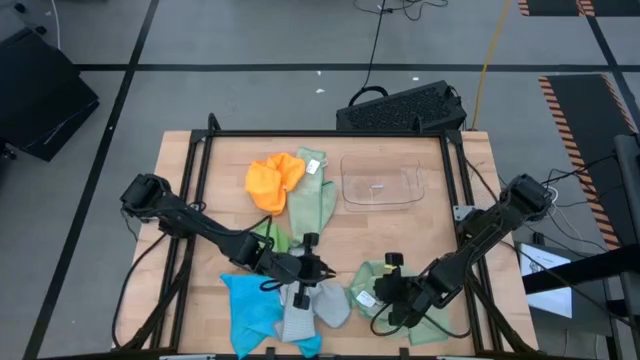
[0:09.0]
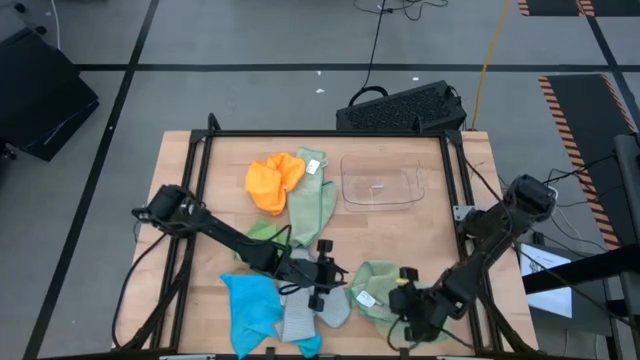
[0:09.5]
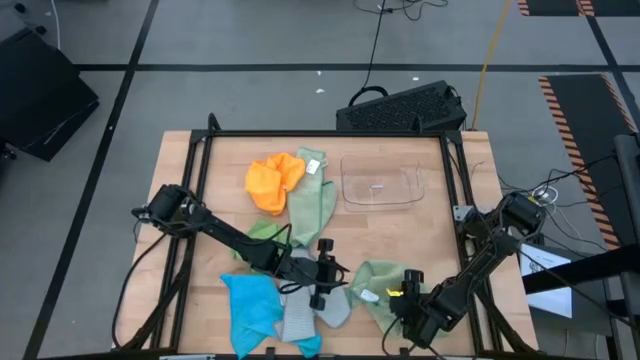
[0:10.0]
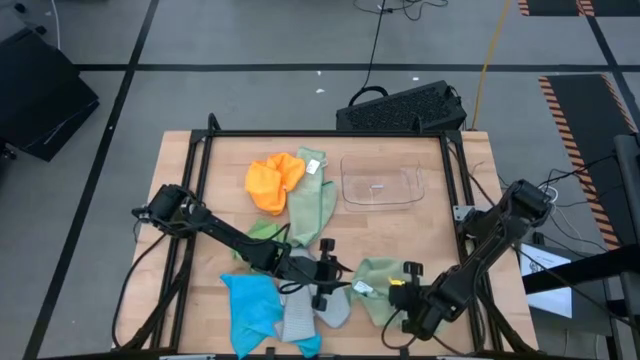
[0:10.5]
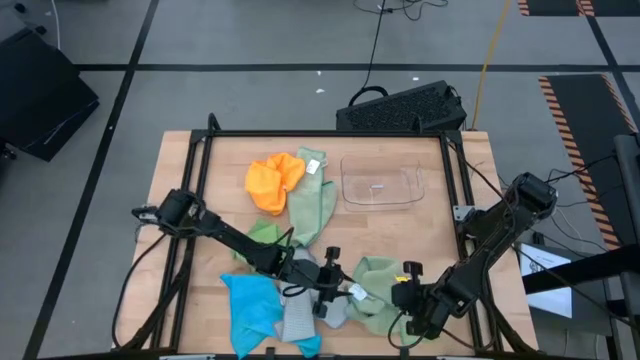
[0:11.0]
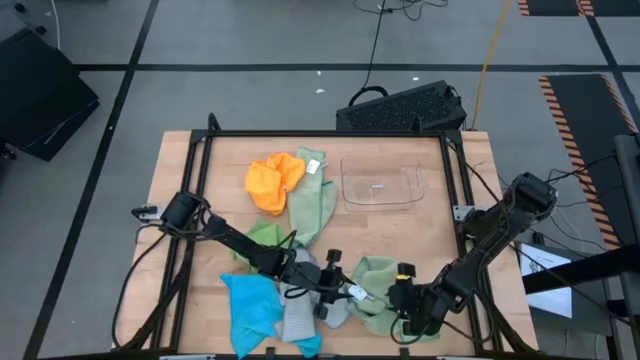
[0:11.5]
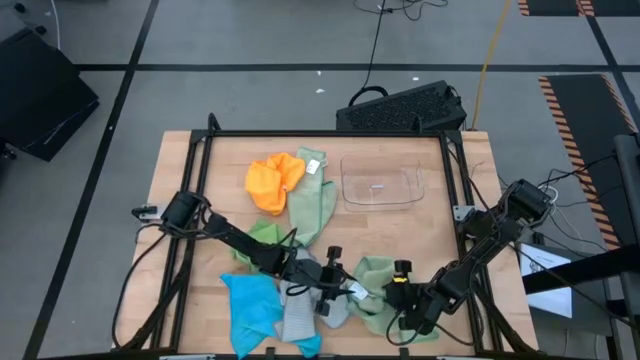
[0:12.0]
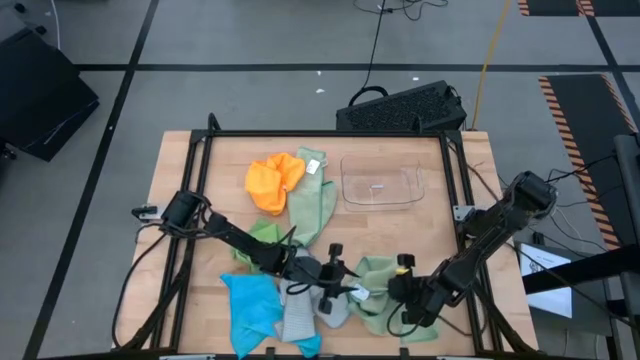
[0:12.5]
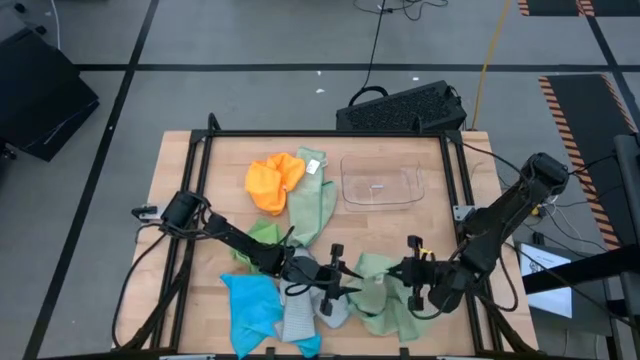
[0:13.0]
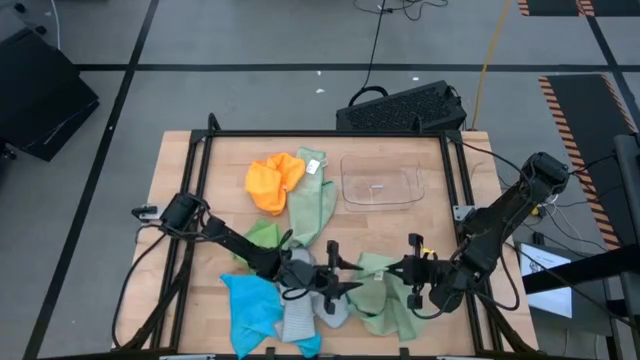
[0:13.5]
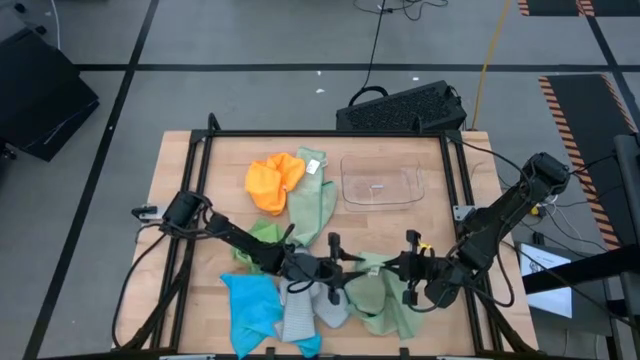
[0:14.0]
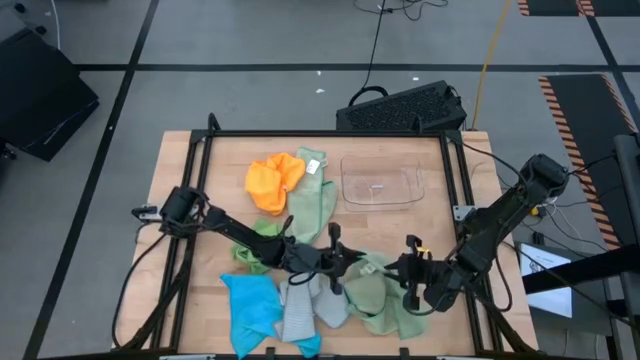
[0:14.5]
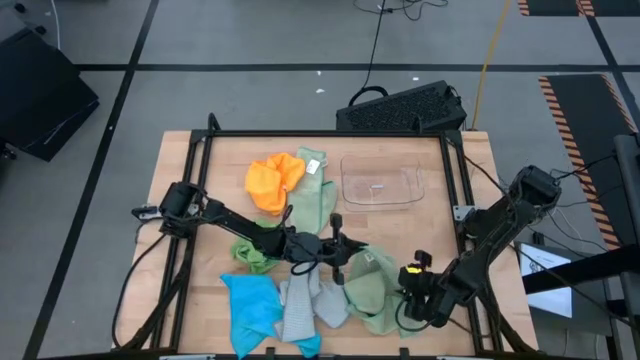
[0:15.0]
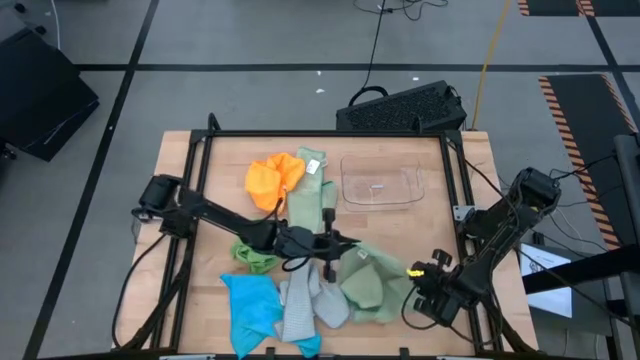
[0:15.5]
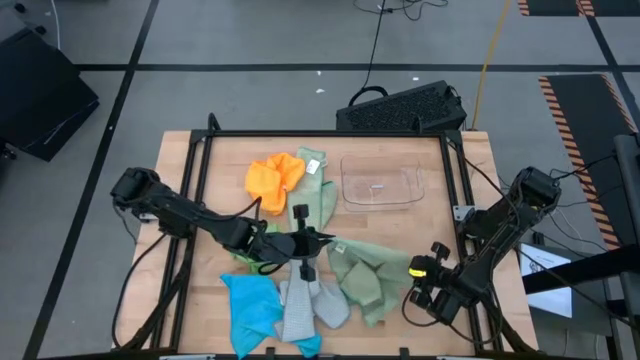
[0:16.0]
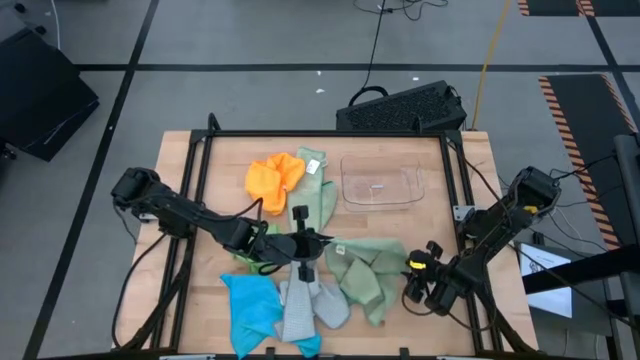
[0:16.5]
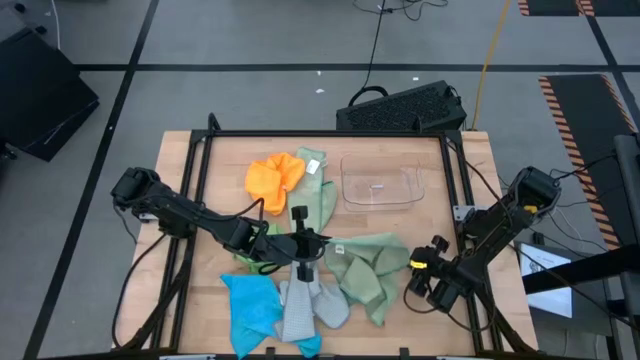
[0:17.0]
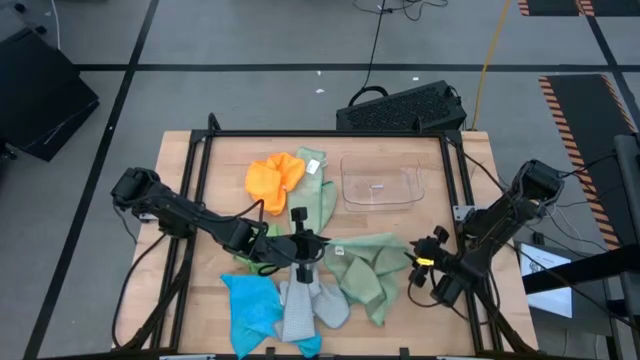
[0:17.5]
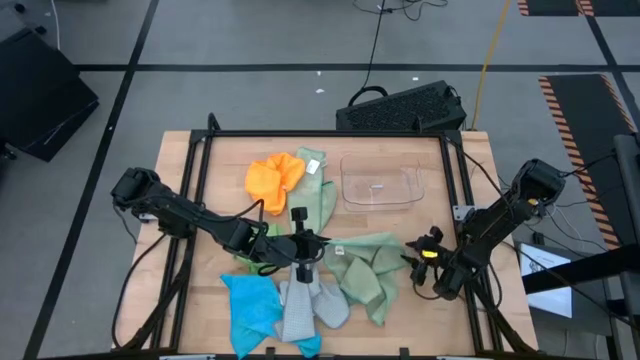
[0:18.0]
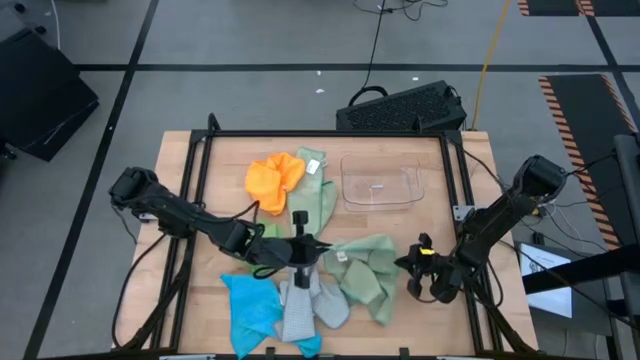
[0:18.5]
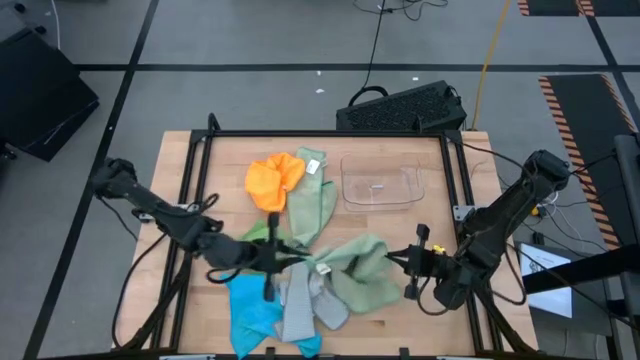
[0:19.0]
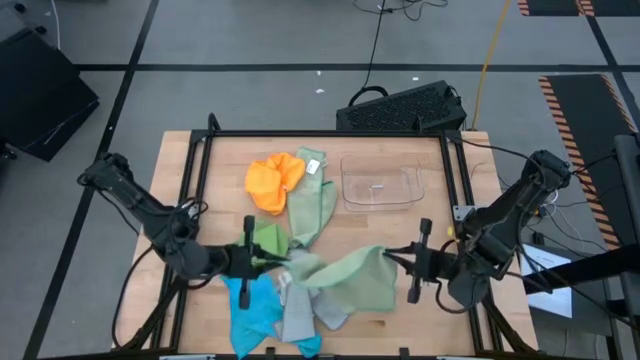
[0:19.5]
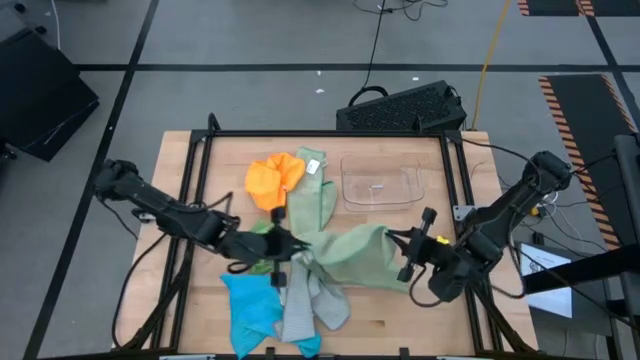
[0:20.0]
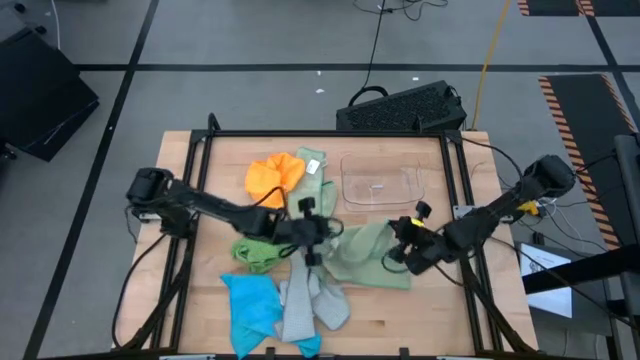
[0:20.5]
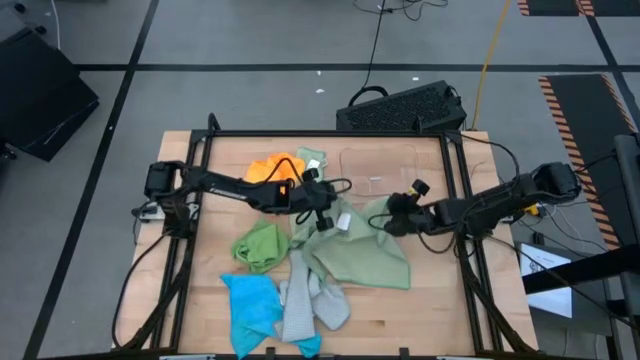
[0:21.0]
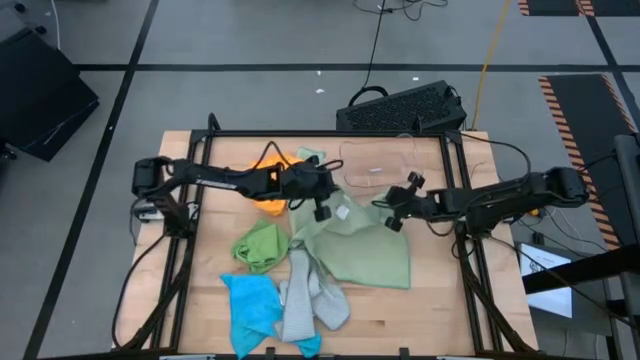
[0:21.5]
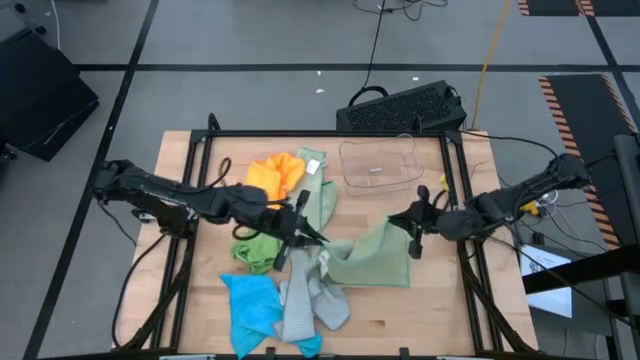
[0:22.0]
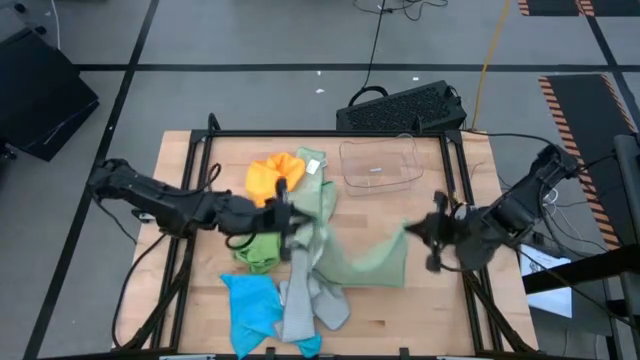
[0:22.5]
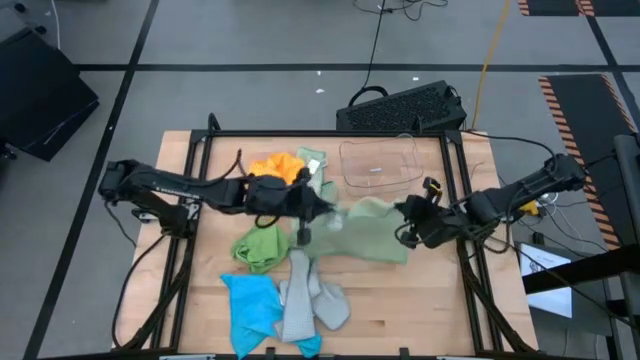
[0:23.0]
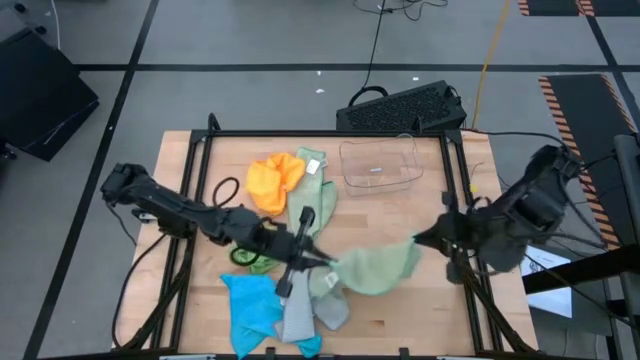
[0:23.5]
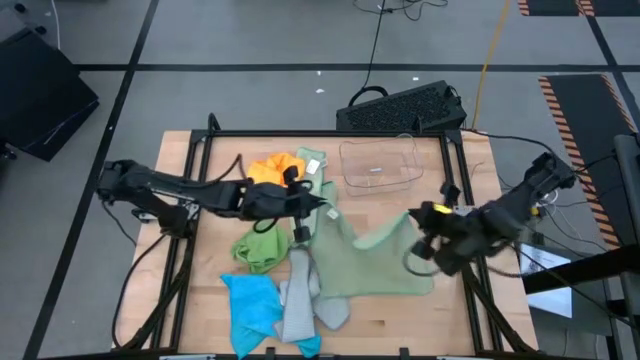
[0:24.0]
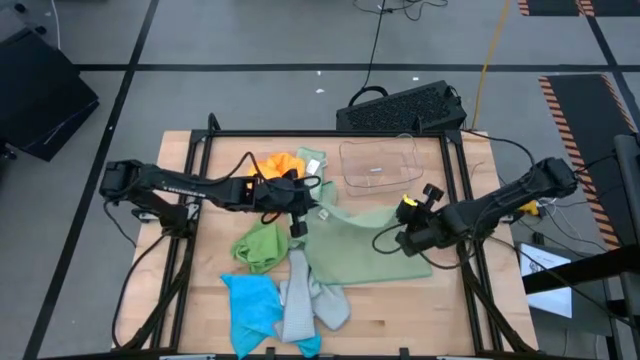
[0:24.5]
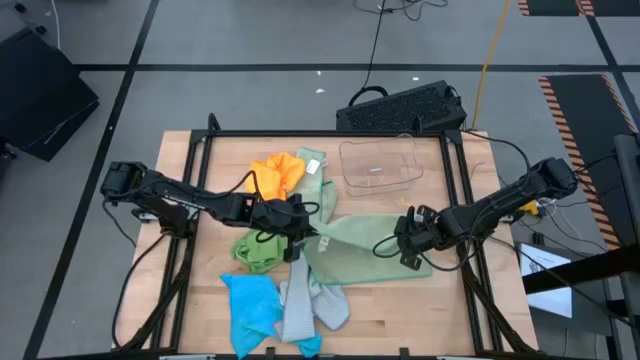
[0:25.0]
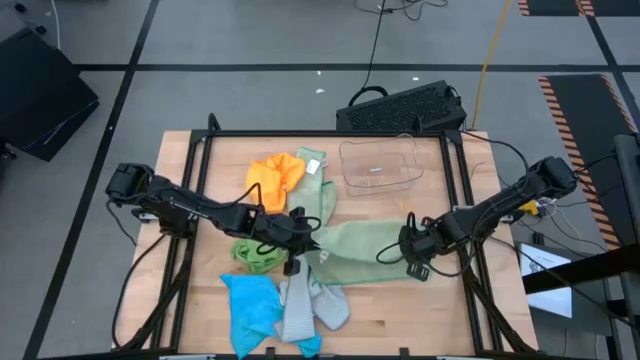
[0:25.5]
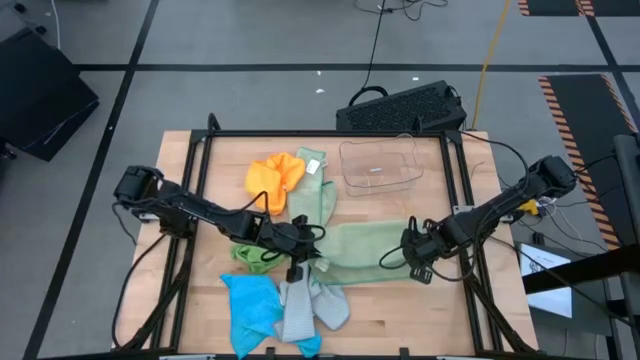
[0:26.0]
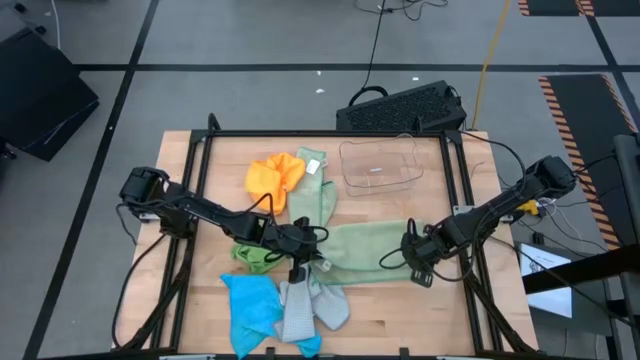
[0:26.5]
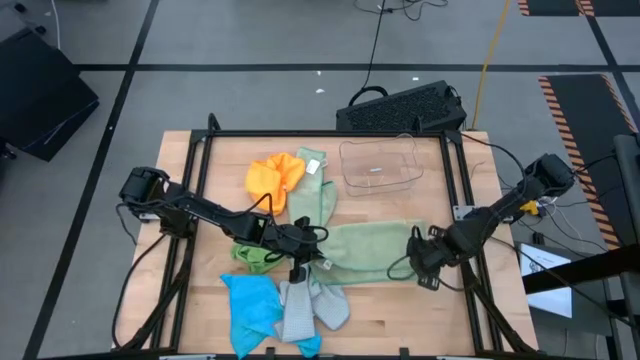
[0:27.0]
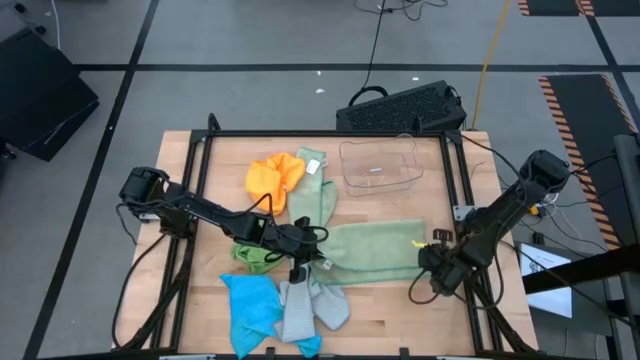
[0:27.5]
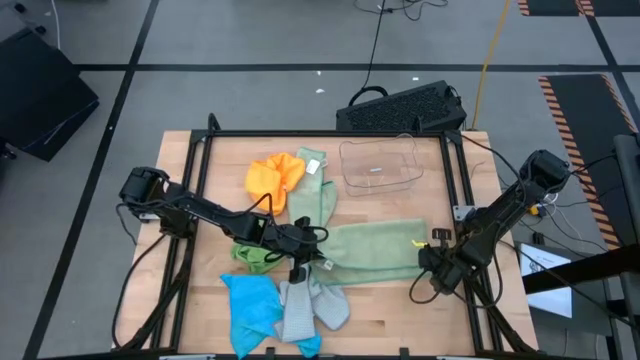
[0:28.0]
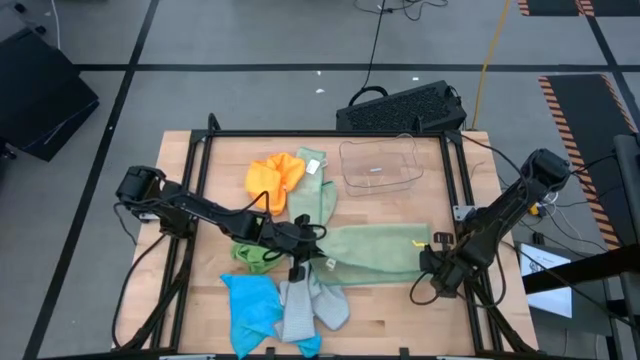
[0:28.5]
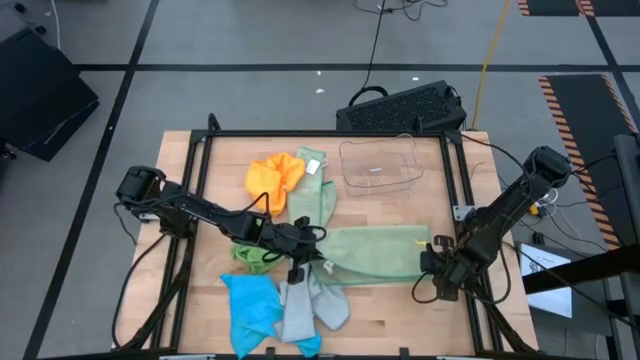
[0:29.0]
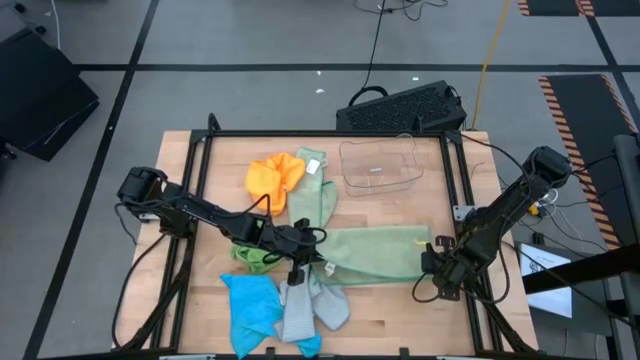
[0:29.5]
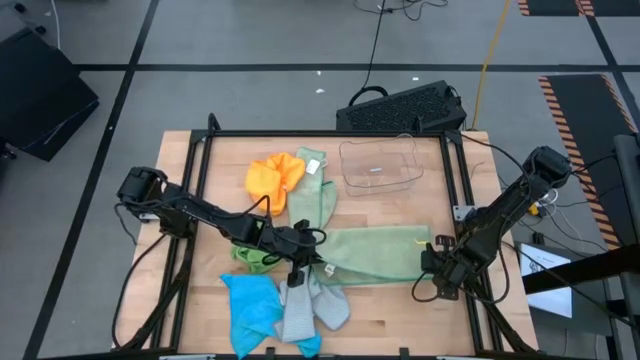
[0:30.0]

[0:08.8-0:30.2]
Task: Fold microfiber towels
Fold the bottom light green microfiber towel
